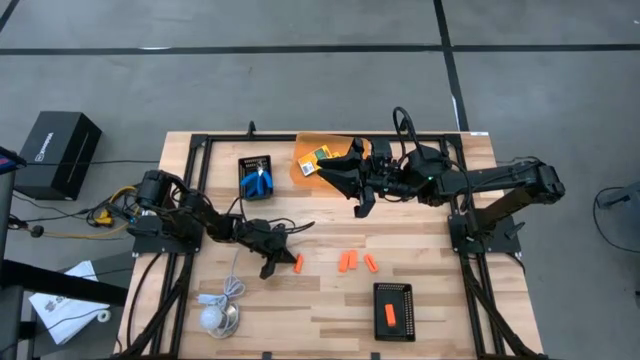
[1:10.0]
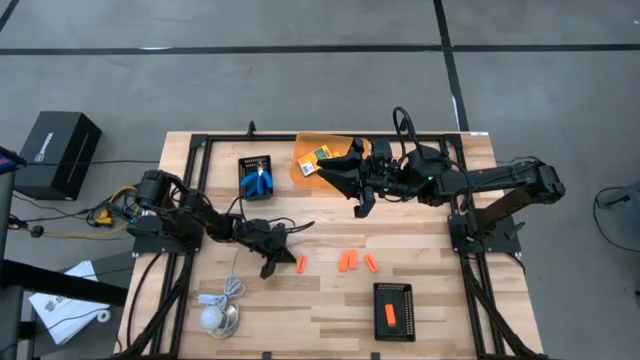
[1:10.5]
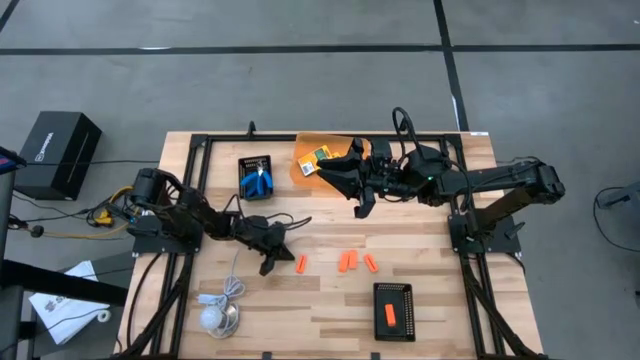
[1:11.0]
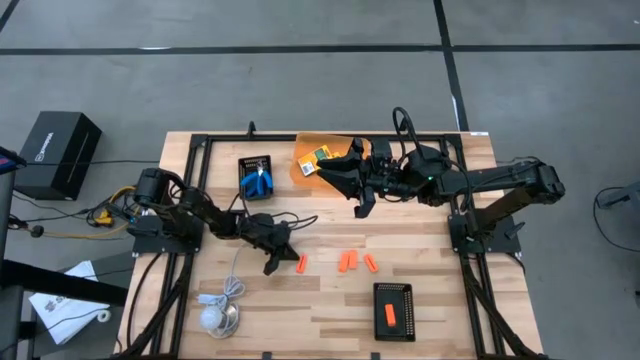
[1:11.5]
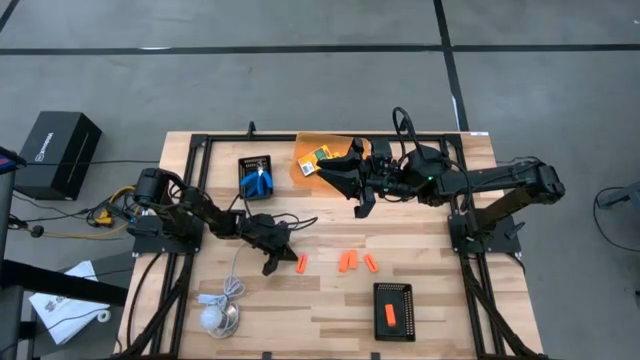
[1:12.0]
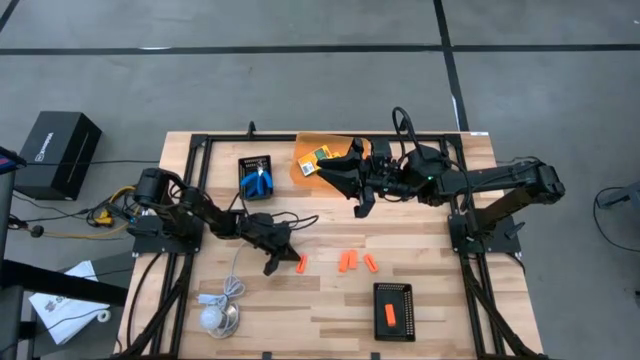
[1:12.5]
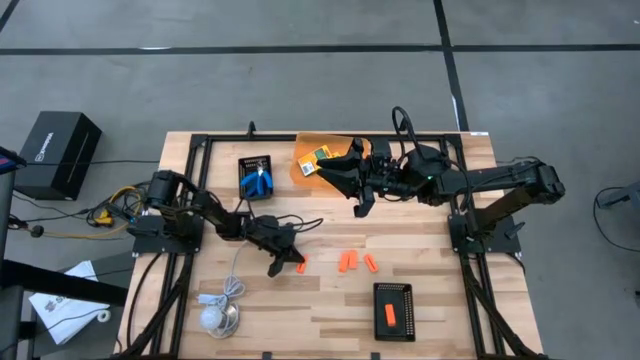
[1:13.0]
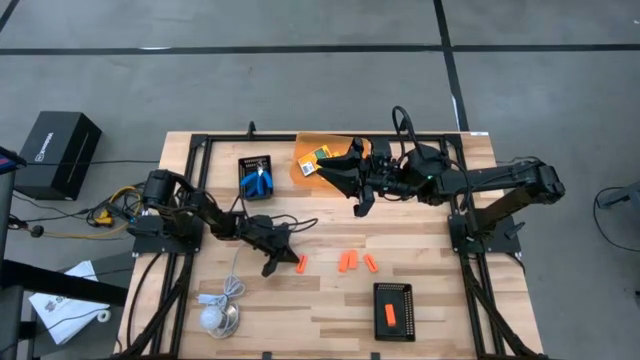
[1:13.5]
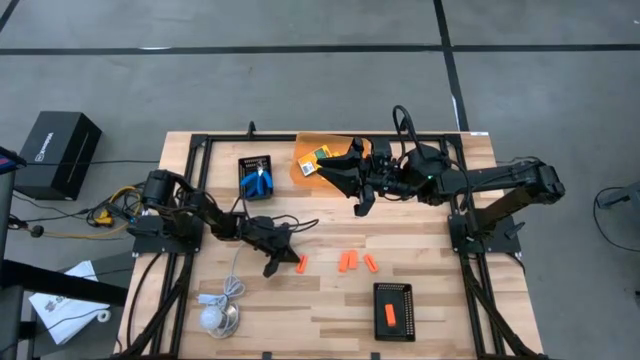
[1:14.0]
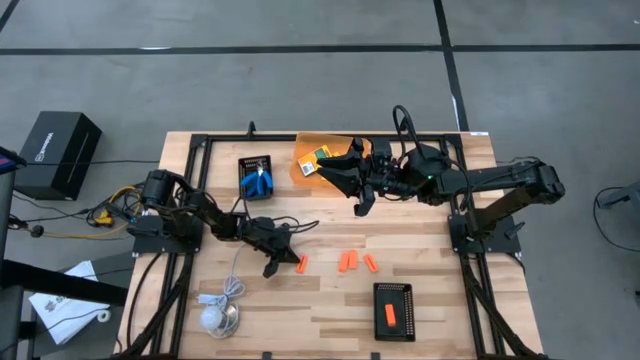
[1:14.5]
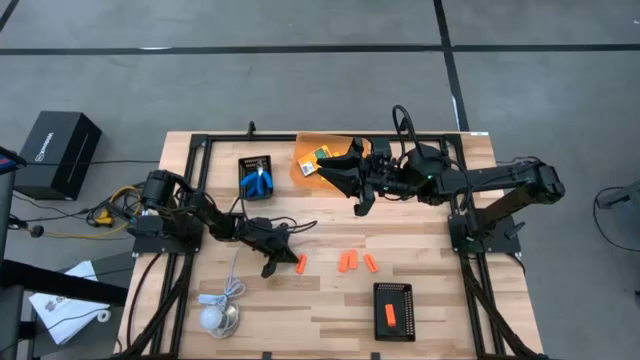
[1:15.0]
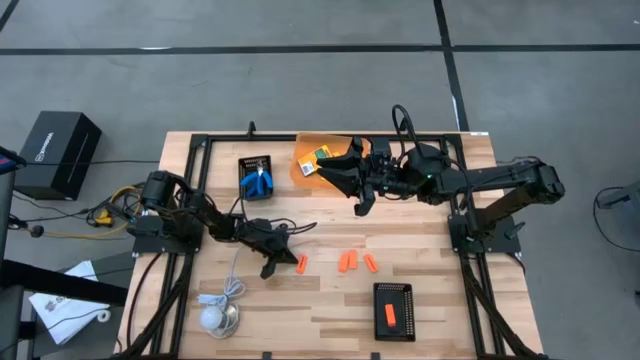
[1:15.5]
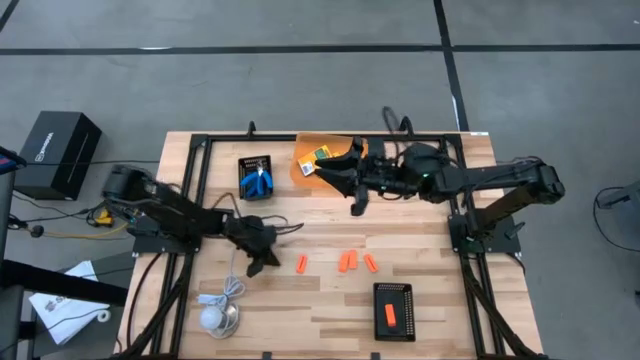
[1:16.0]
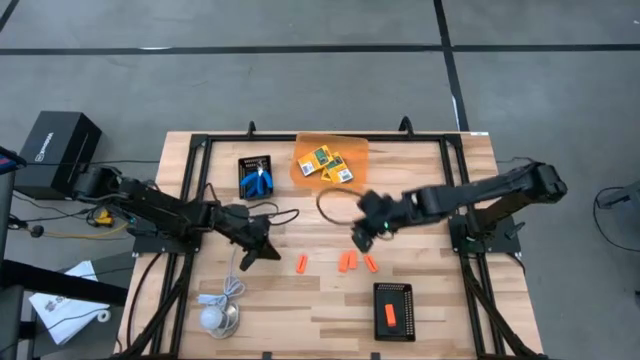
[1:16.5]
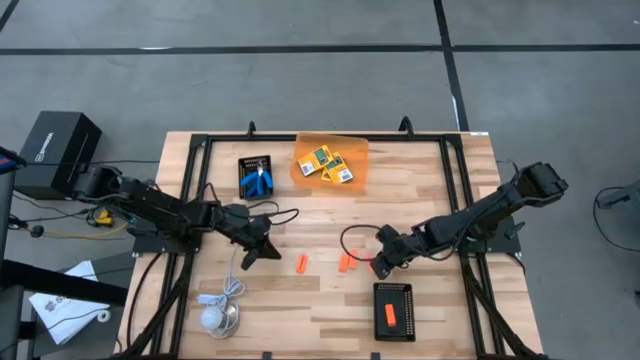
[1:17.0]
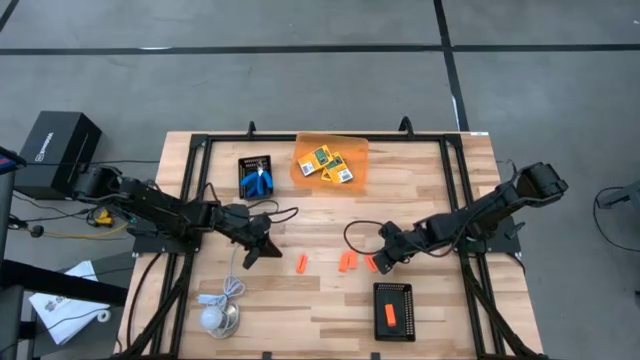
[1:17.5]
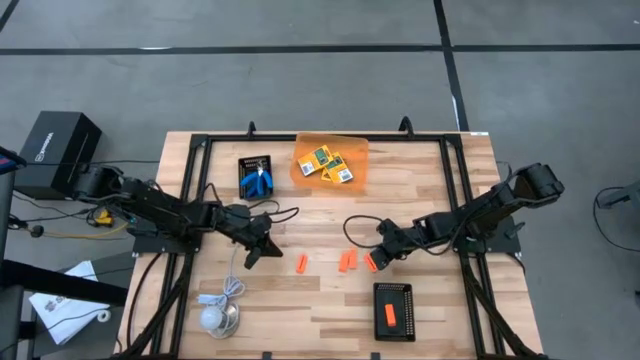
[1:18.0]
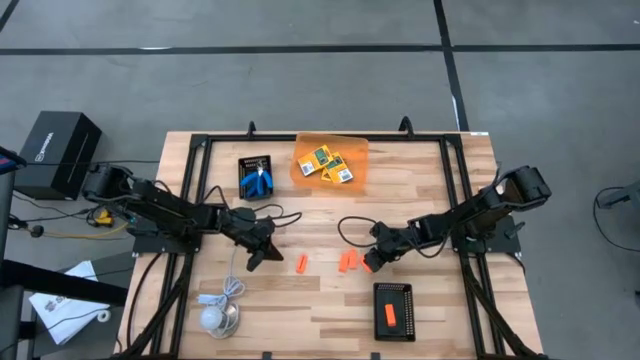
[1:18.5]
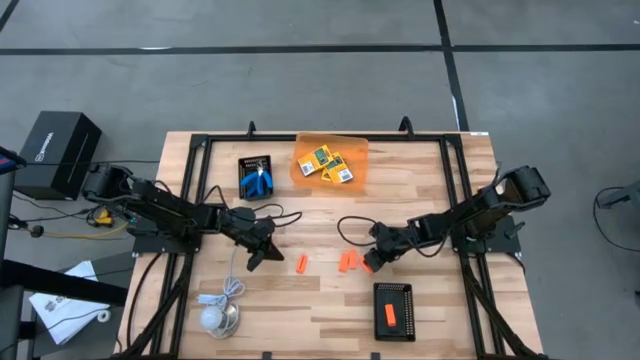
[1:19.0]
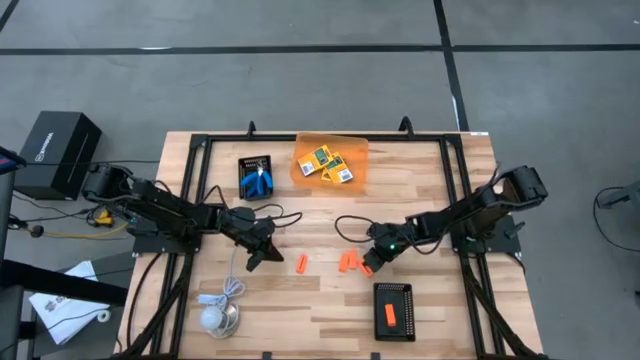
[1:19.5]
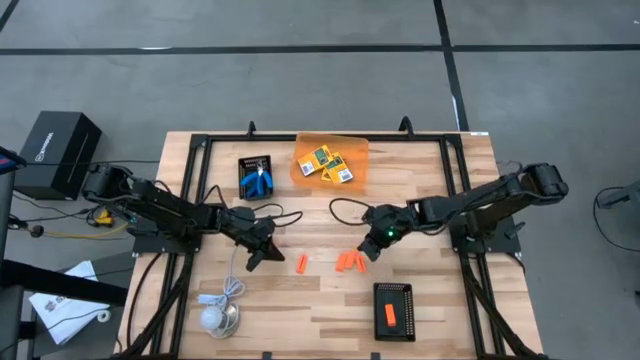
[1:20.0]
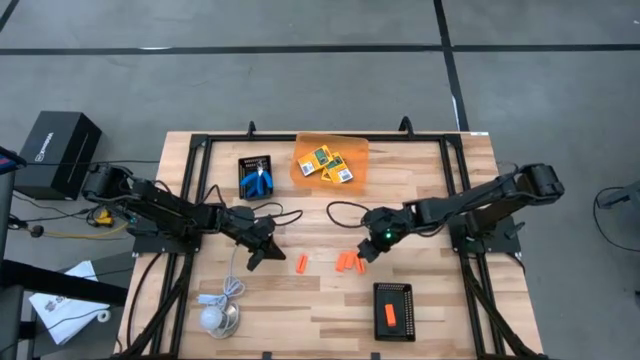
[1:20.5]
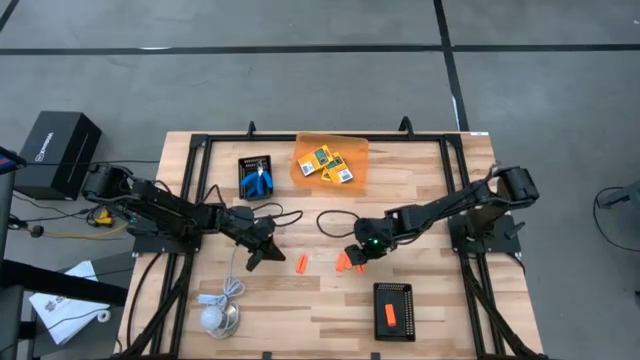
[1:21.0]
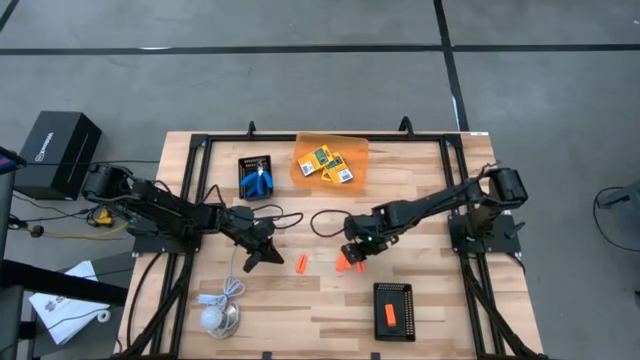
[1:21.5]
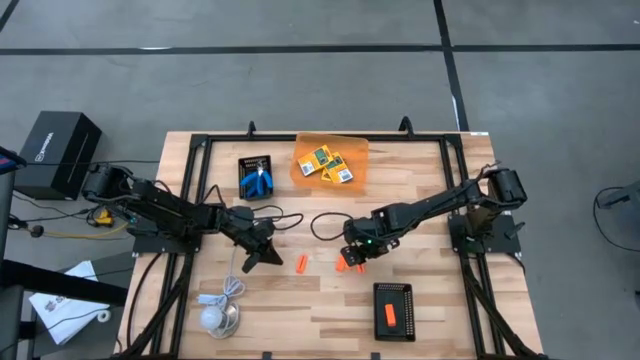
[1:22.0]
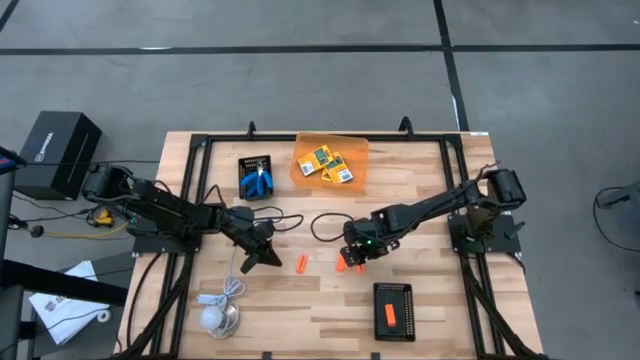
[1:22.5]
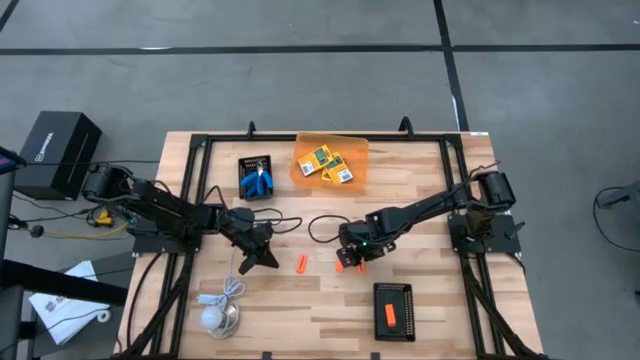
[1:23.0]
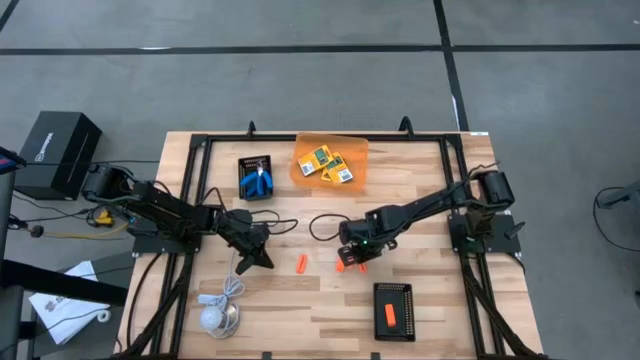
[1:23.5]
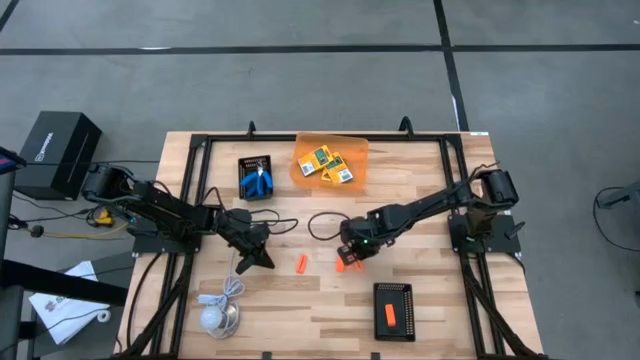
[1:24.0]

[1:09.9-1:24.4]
Task: Pick & Place School Supplies
Put the eraser into the bottom black bin

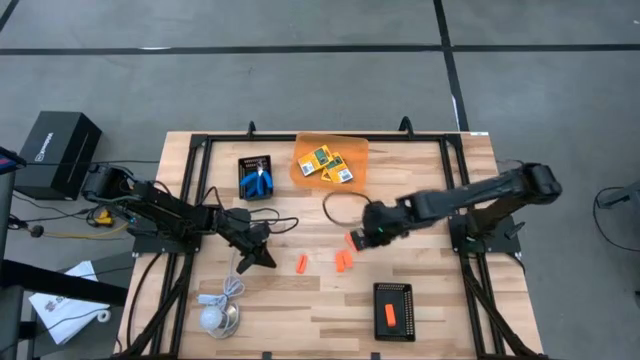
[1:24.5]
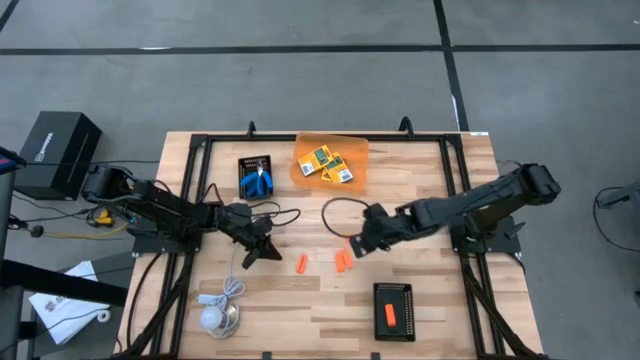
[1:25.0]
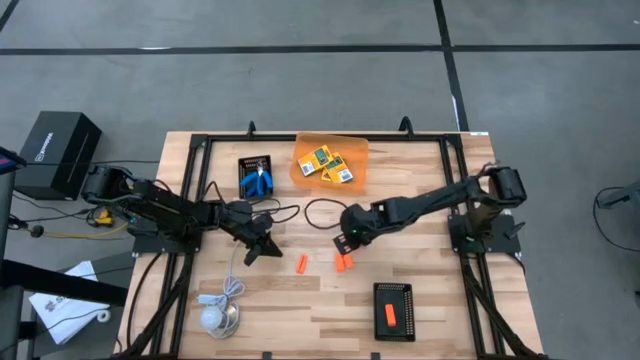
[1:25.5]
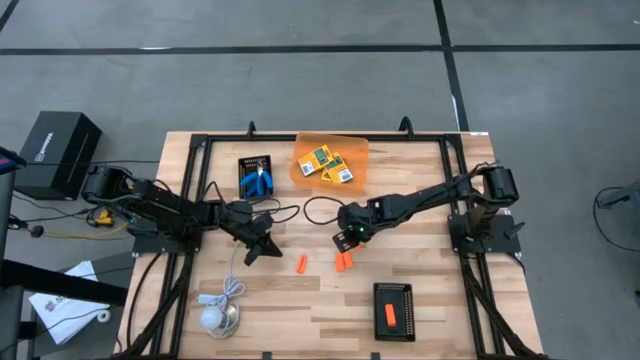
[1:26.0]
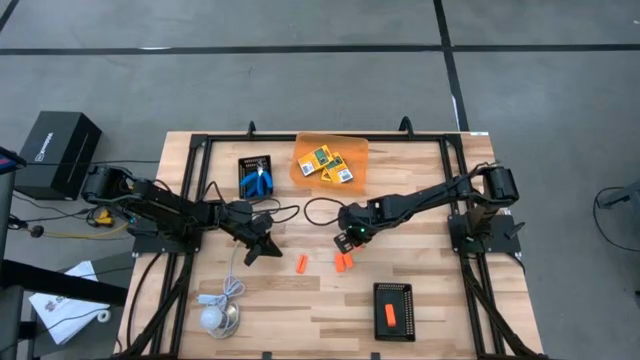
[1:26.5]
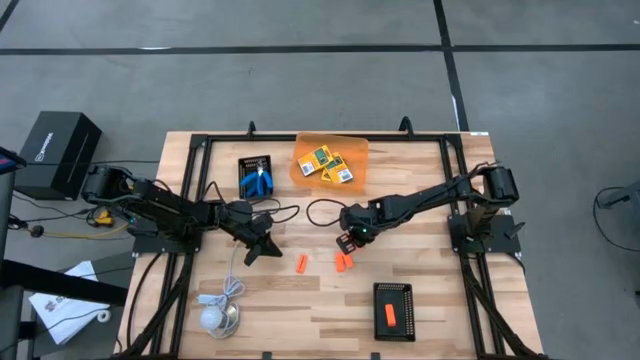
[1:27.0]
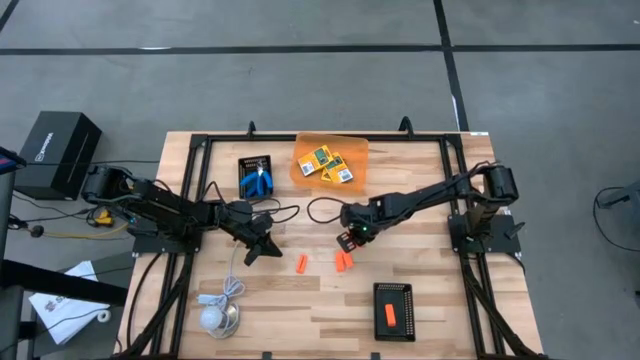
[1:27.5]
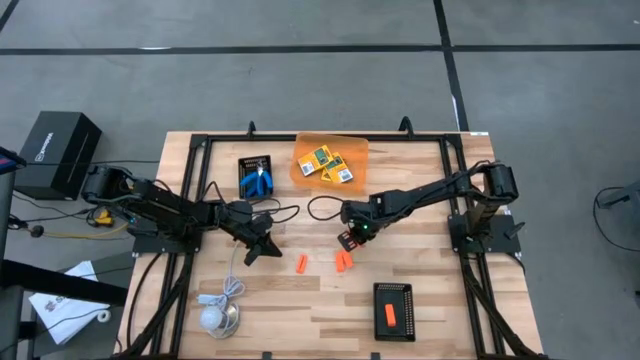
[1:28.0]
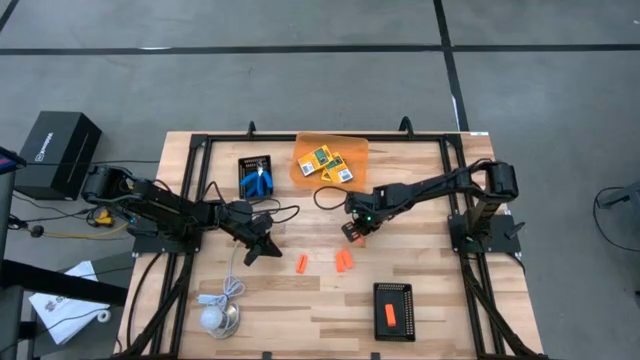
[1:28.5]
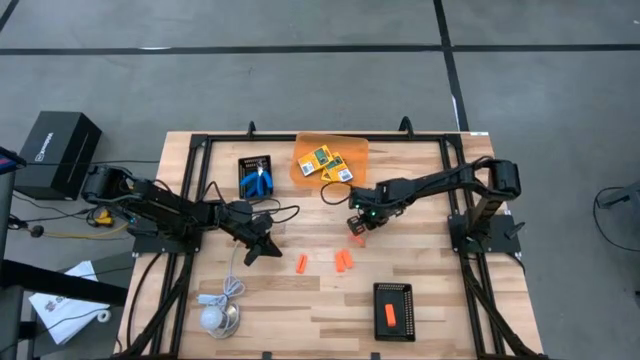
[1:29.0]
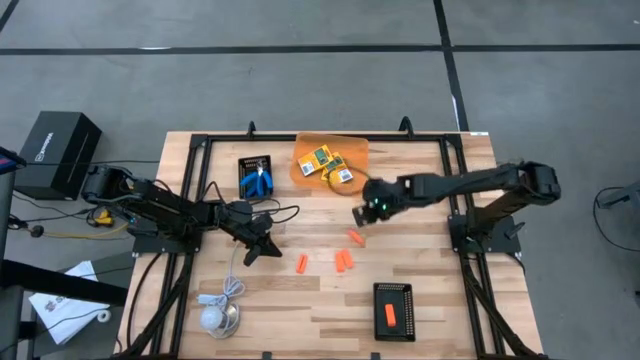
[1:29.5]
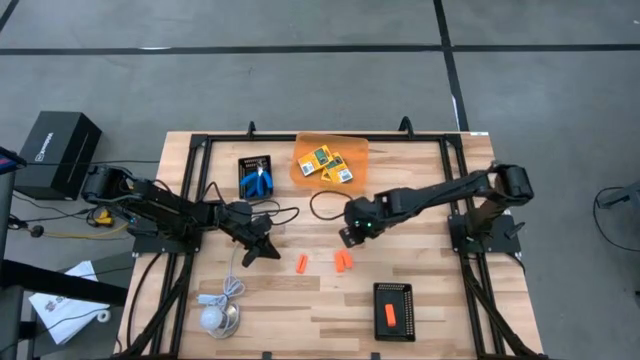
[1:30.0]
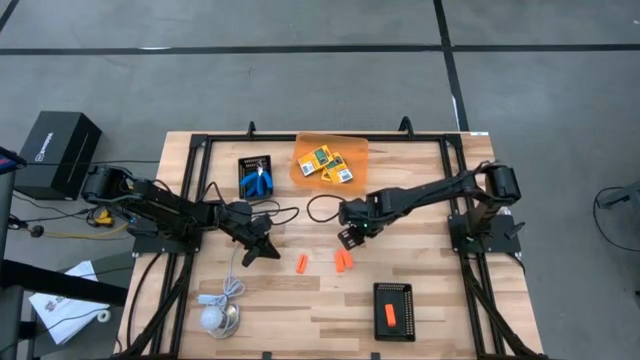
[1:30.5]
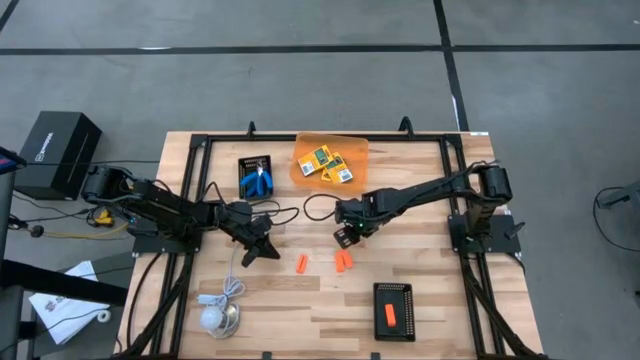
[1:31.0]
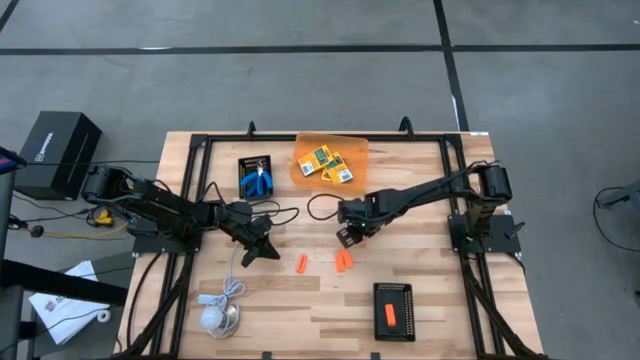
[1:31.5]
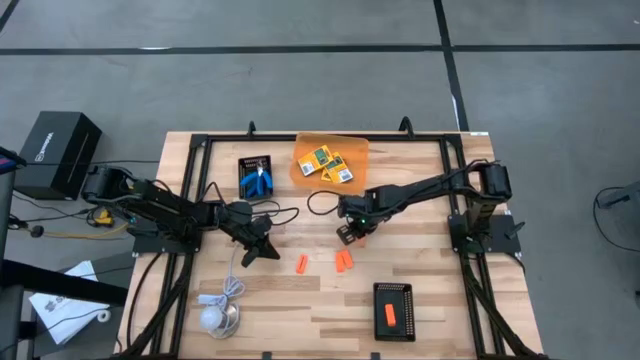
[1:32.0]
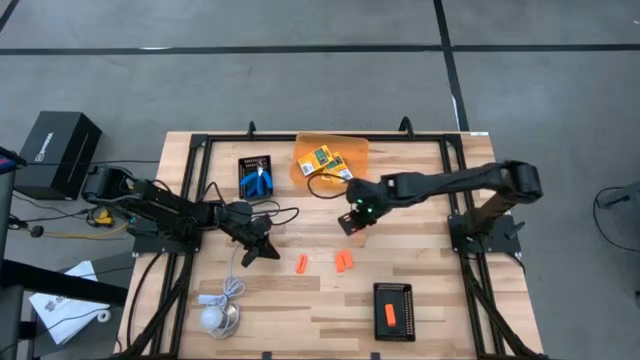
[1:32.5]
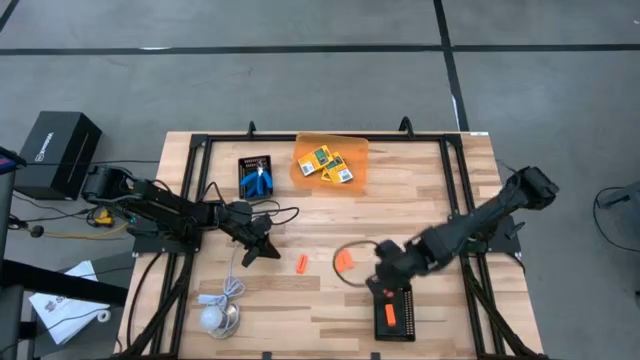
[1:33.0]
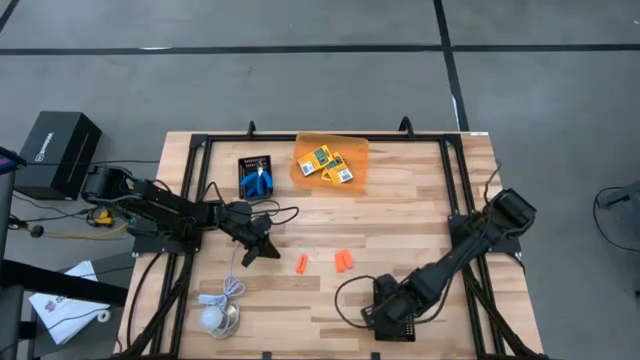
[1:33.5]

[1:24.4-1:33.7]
Put the eraser into the bottom black bin
